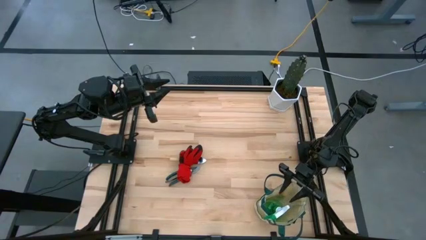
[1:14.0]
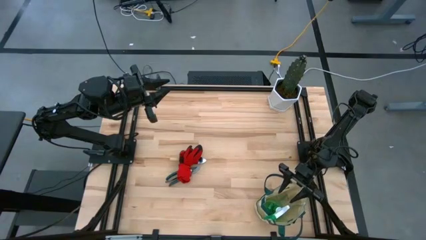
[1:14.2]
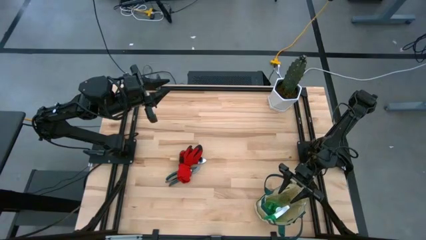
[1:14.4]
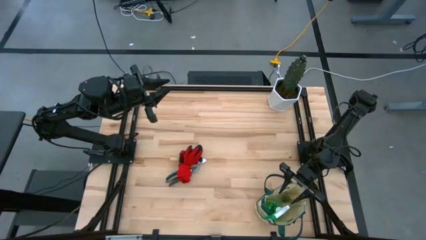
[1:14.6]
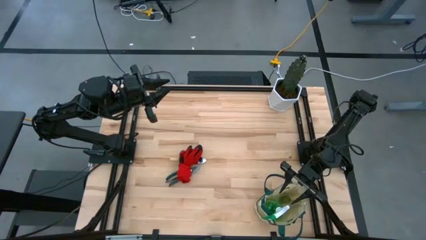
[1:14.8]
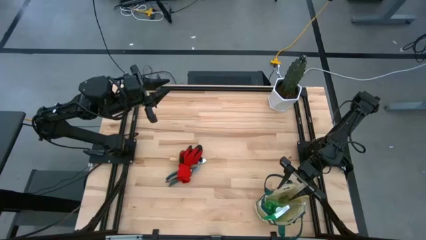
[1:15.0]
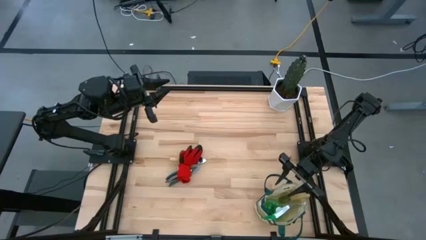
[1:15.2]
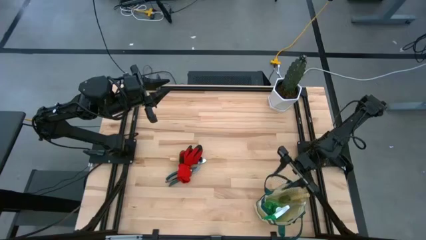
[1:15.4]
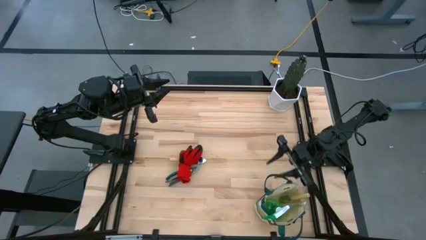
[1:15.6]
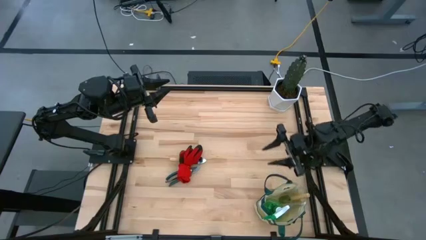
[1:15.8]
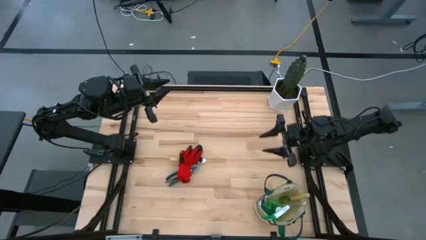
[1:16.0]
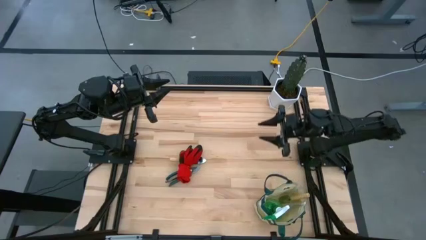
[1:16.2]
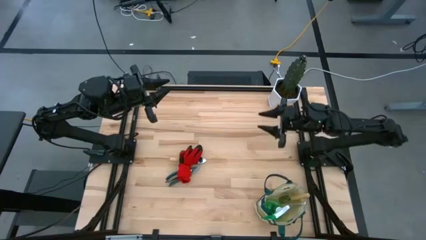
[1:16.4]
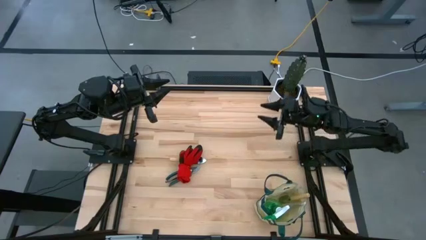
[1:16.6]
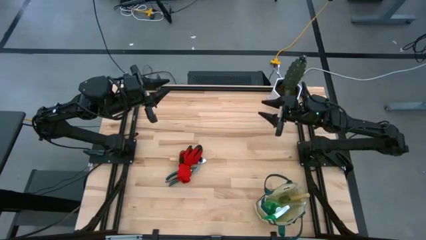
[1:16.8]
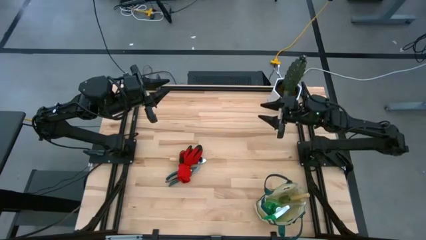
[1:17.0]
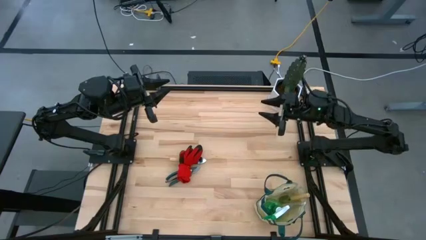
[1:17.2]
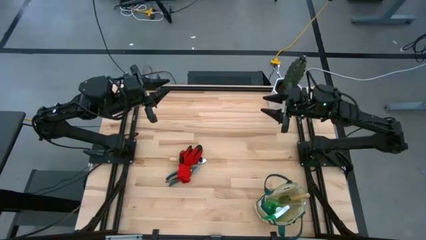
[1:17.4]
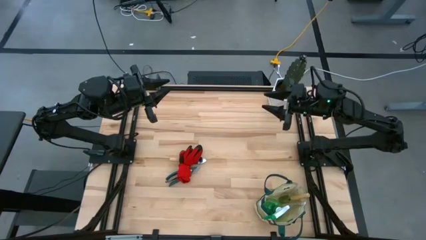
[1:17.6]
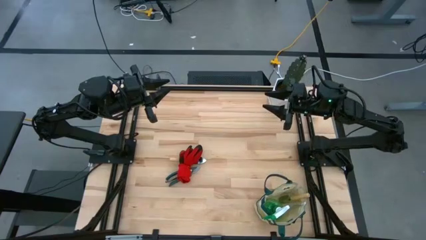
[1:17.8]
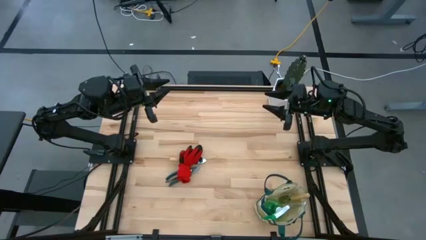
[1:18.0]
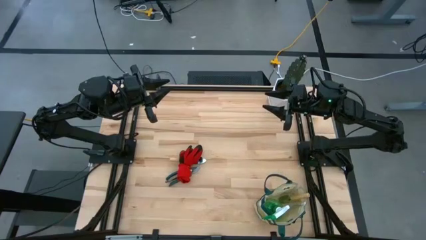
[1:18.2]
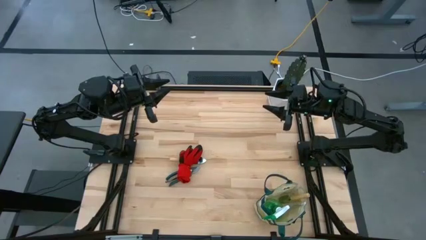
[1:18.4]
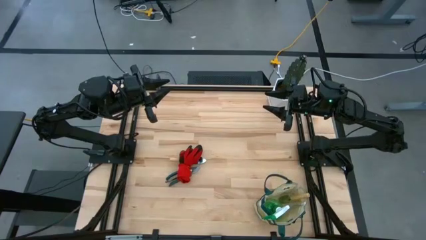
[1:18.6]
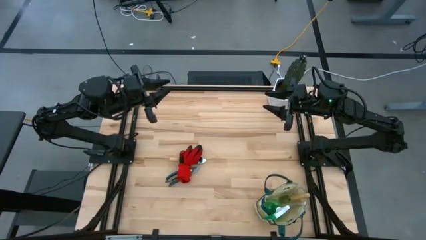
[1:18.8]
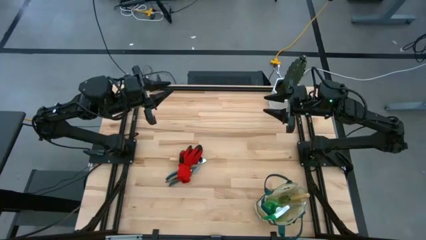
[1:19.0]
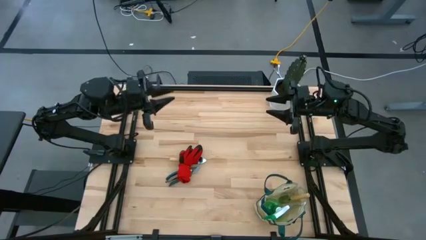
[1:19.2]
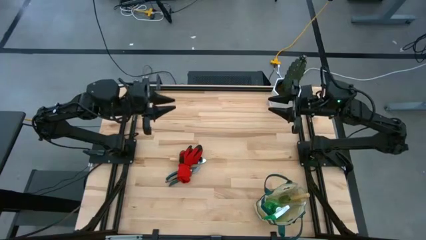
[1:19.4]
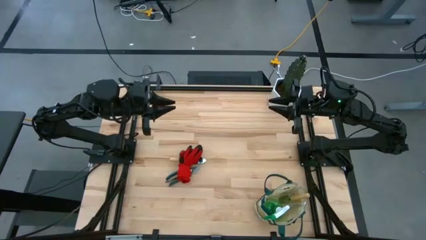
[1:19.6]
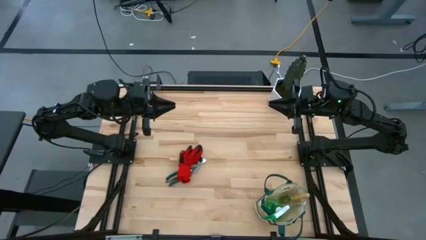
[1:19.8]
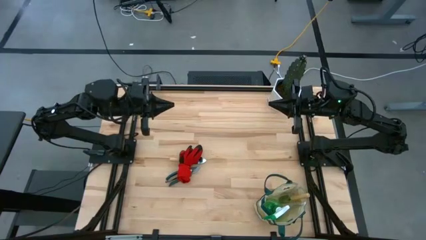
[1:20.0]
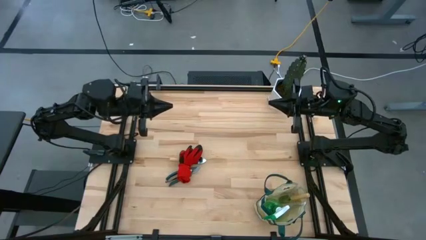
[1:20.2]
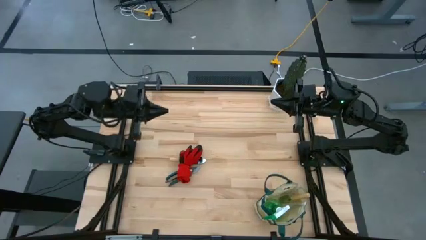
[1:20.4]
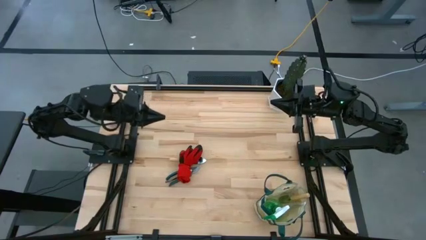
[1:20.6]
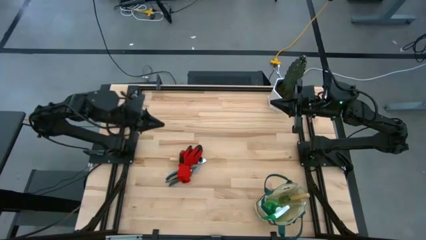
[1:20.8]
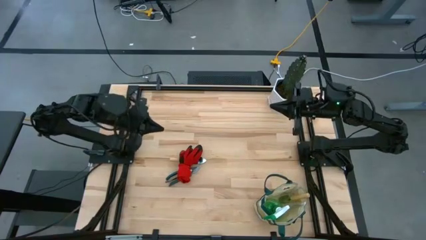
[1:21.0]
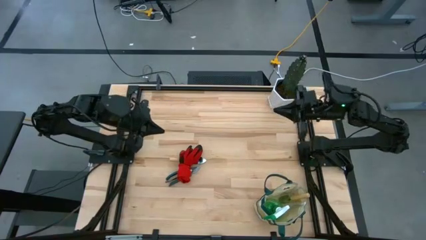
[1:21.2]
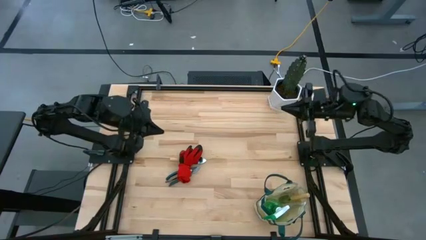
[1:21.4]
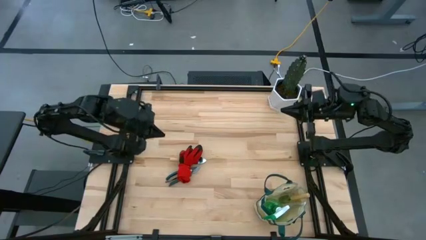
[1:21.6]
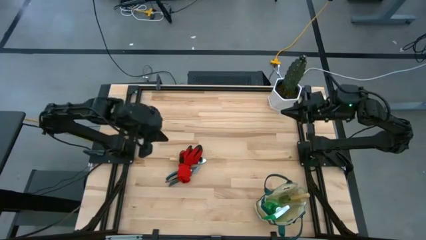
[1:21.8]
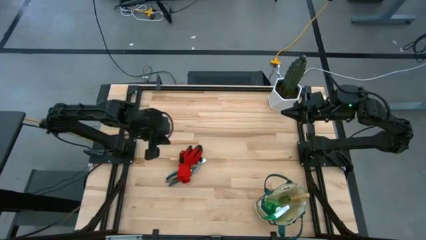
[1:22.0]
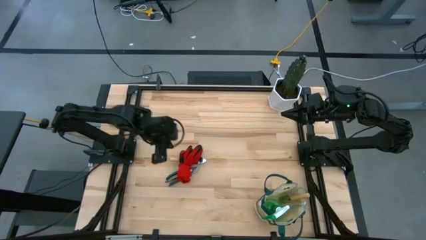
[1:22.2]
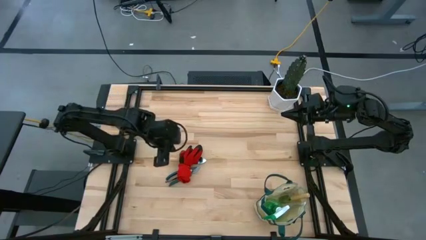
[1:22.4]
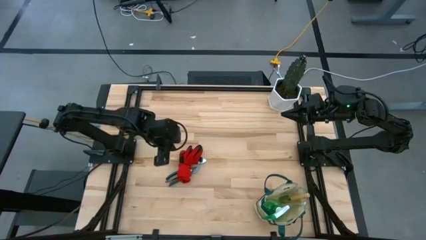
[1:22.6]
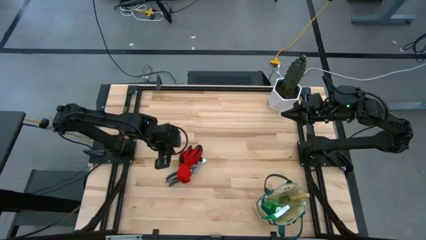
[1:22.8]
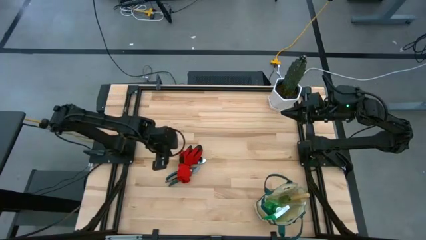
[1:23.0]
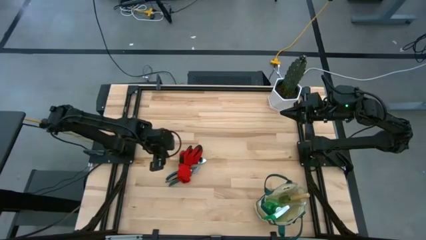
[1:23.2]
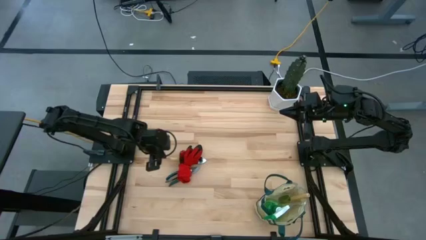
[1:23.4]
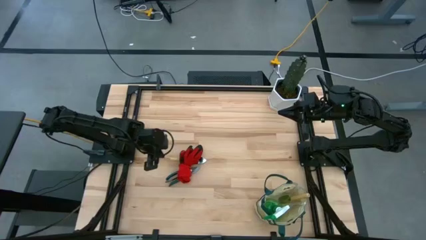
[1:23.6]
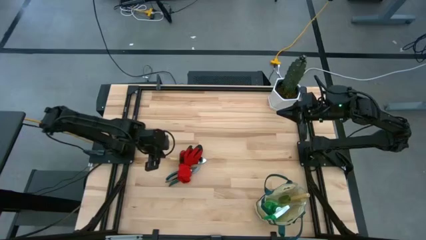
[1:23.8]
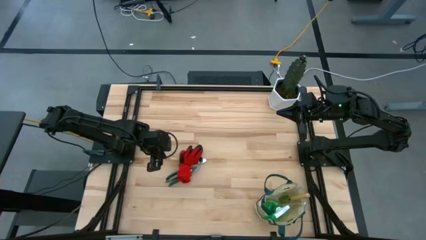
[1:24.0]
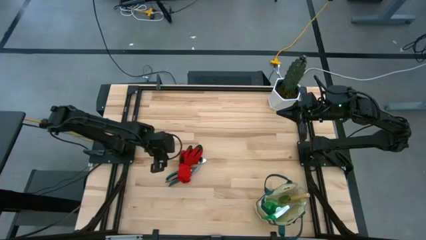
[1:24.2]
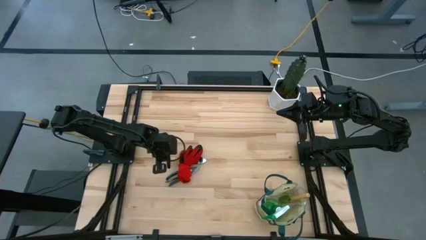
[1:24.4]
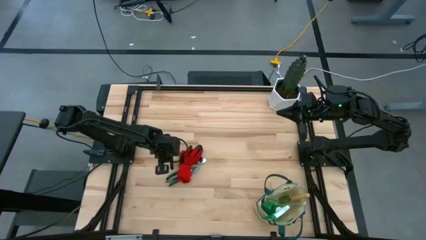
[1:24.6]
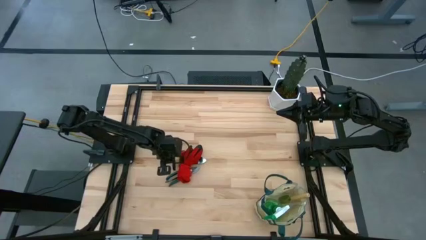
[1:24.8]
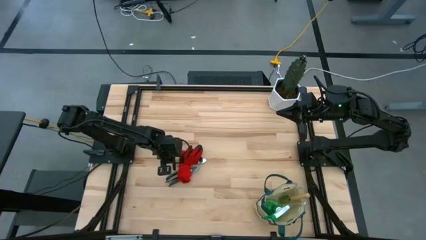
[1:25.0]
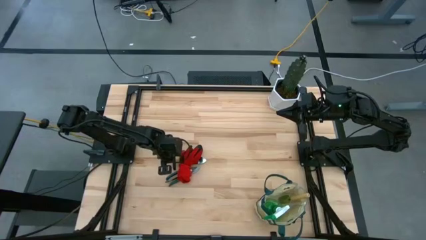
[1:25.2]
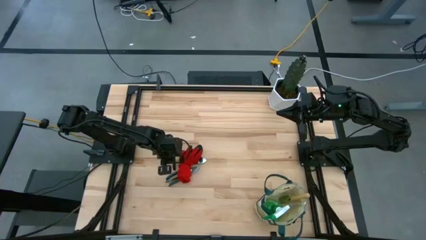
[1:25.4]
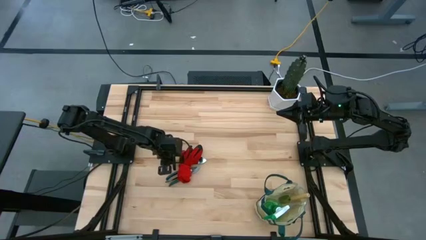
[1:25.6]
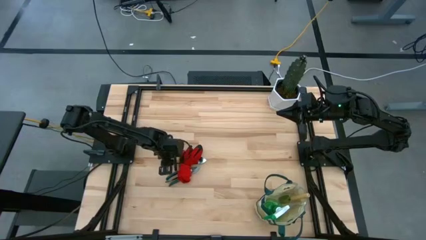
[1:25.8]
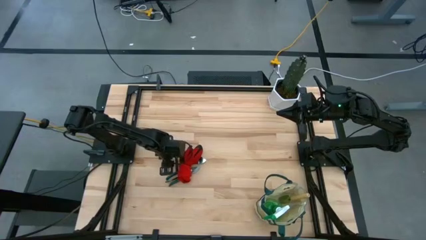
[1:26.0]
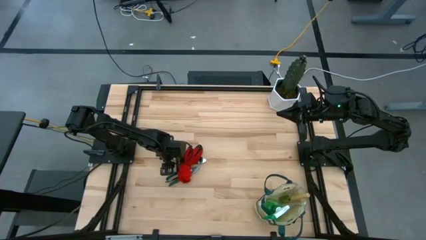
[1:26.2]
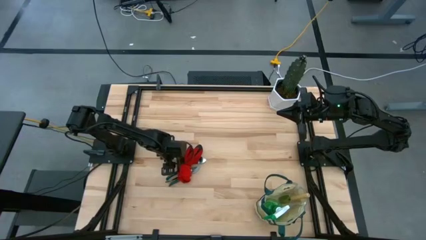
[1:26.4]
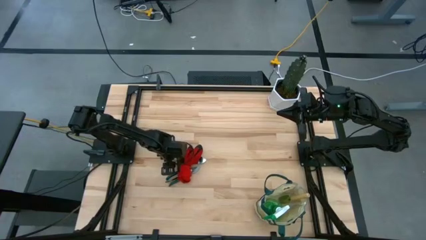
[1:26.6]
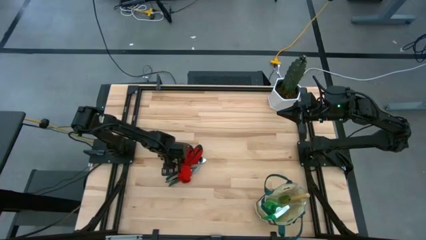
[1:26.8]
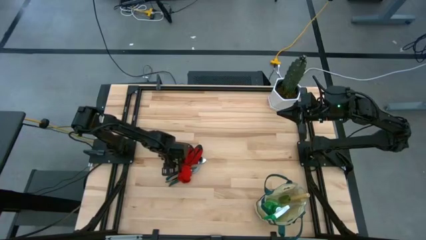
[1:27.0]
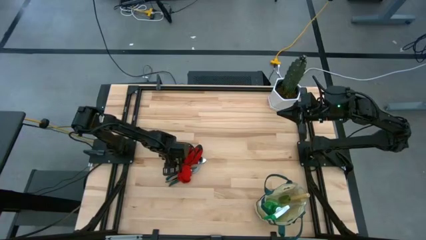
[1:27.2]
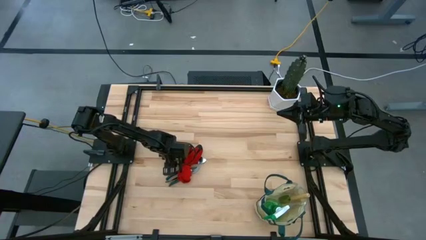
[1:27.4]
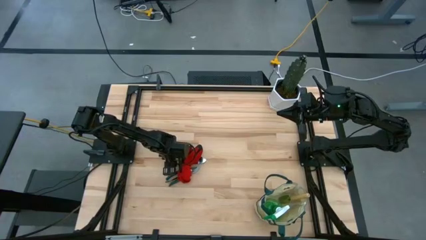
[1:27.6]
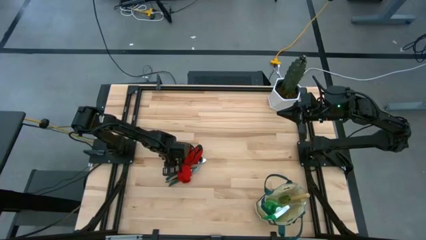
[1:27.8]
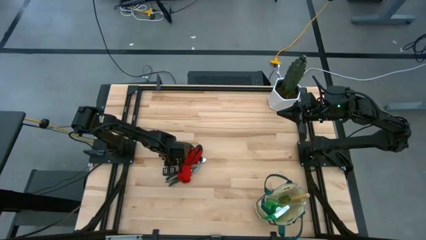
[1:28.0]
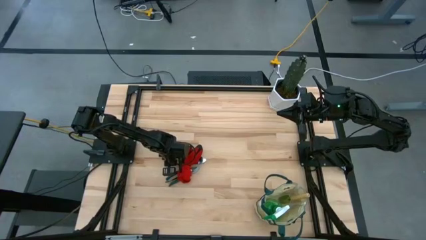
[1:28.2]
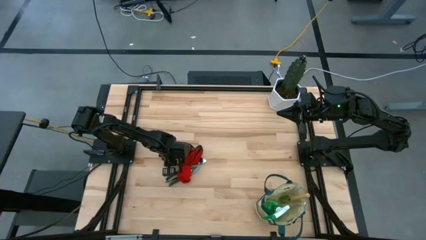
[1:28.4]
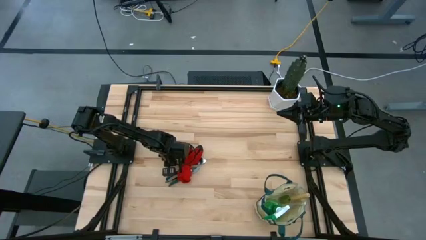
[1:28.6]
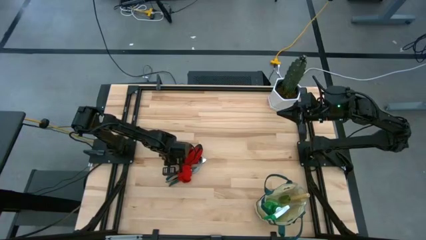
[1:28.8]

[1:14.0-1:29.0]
Task: Pick & Place Garden tools in Gardening bag
Put the light brown trowel into the gardening tool bag

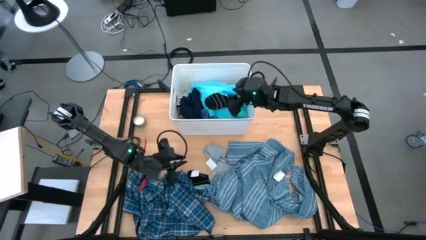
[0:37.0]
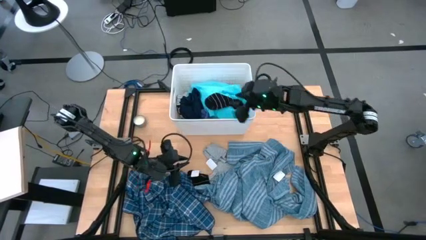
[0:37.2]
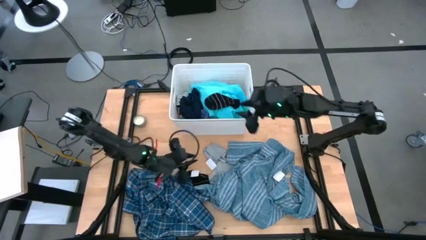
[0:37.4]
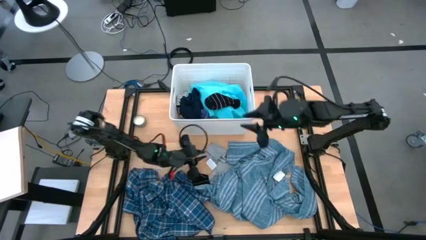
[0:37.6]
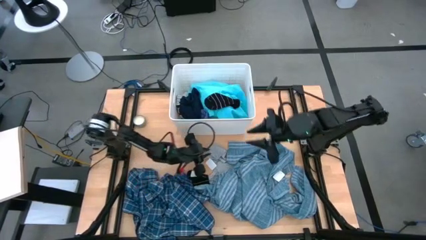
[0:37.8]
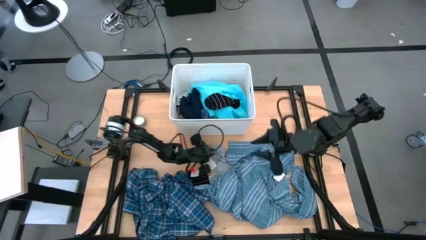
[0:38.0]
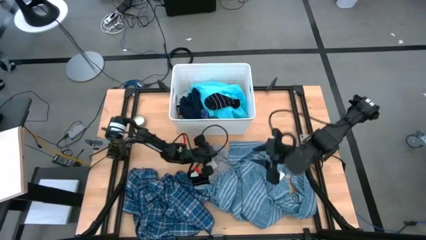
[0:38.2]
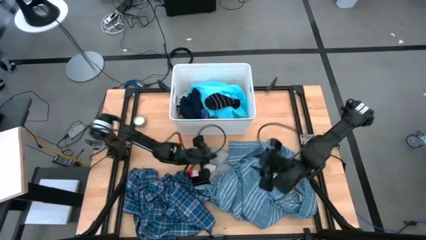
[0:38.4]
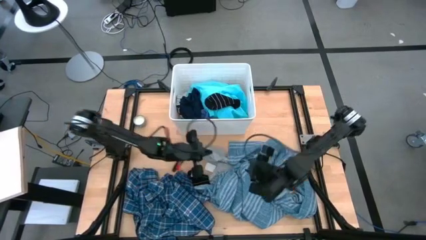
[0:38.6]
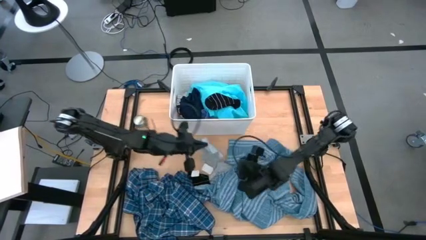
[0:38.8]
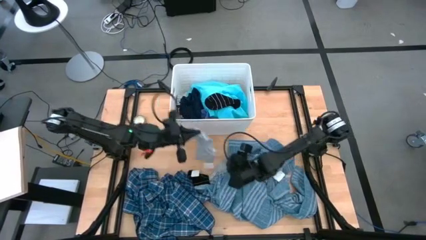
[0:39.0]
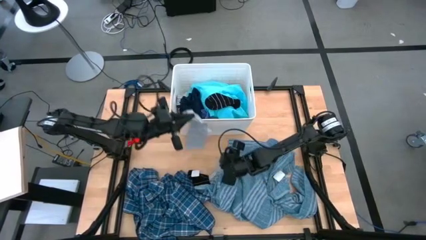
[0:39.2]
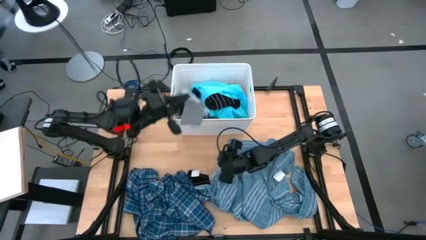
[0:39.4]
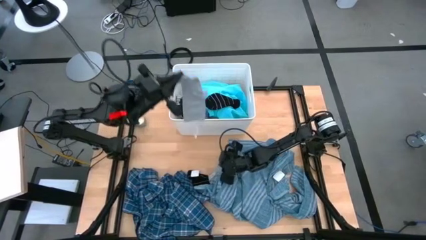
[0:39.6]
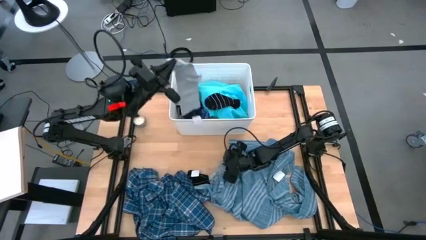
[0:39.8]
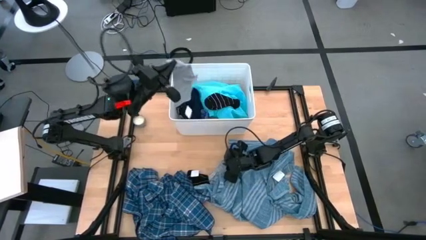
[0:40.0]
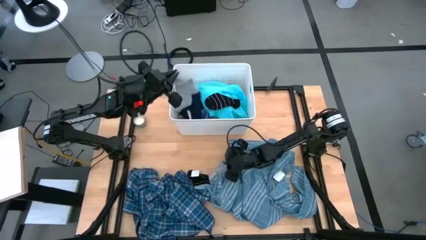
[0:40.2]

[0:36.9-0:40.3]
Task: Sort clothes
Put the top gray sock into the white bin
